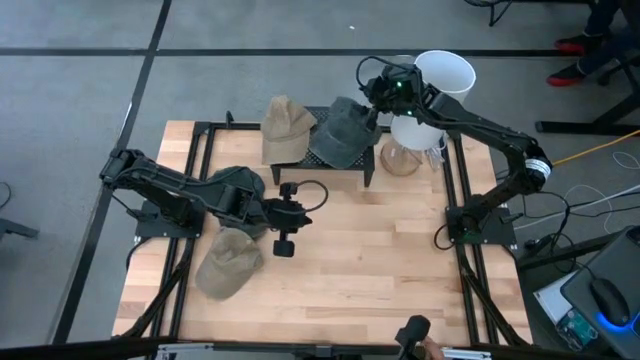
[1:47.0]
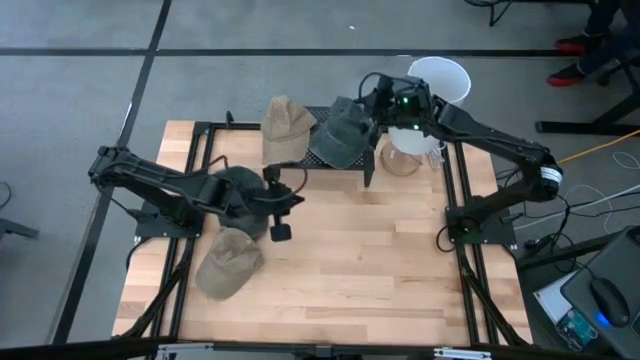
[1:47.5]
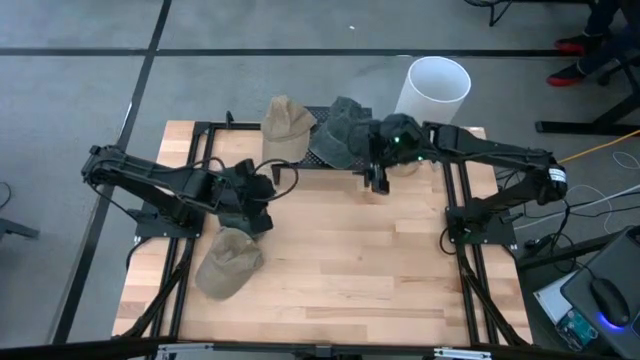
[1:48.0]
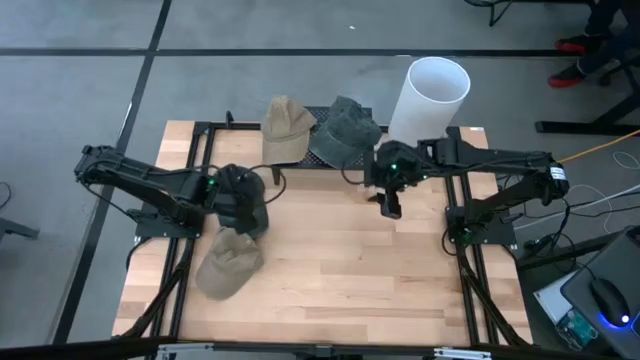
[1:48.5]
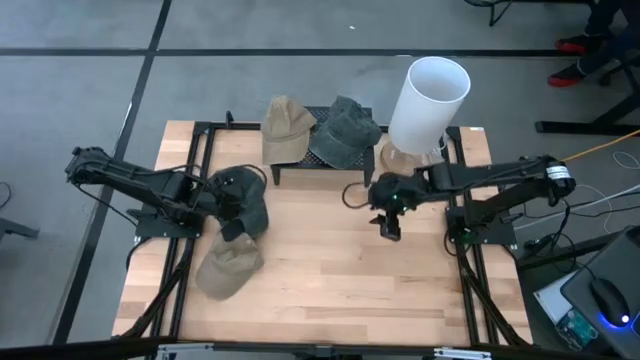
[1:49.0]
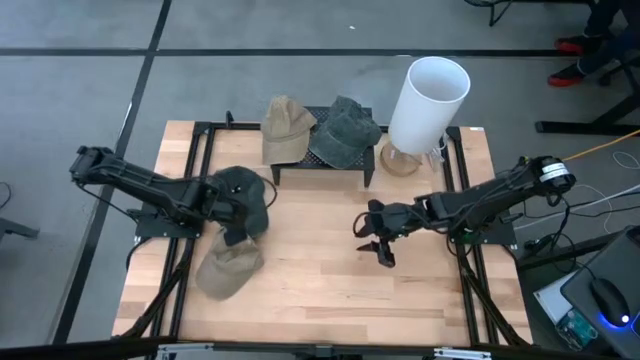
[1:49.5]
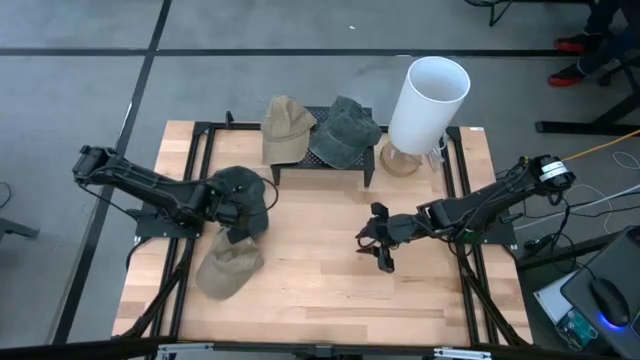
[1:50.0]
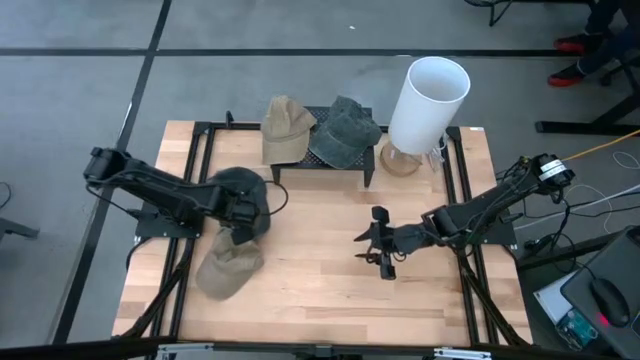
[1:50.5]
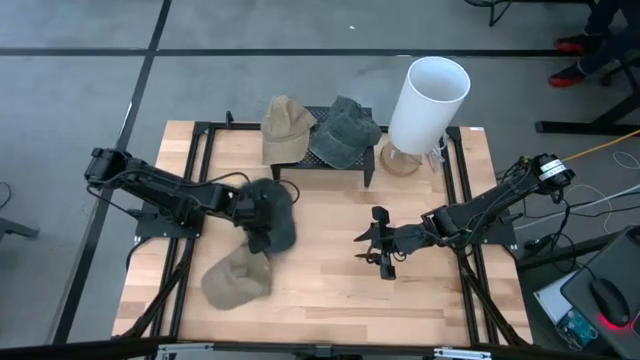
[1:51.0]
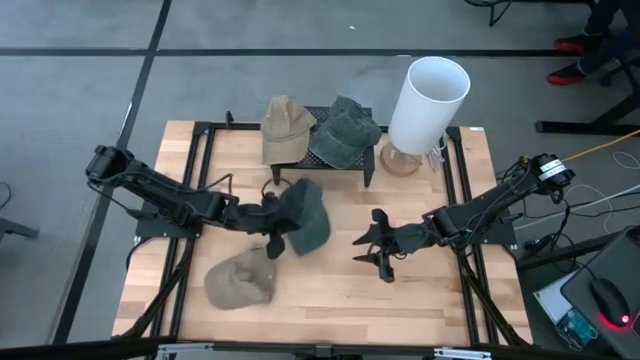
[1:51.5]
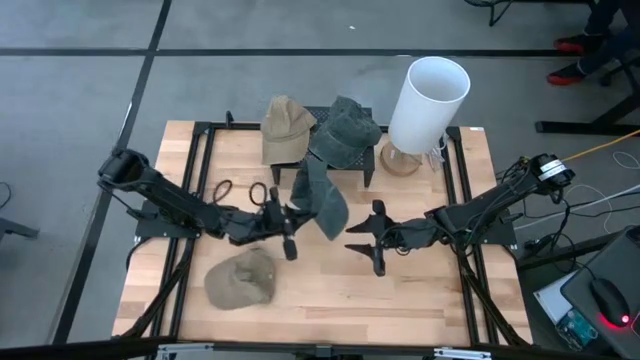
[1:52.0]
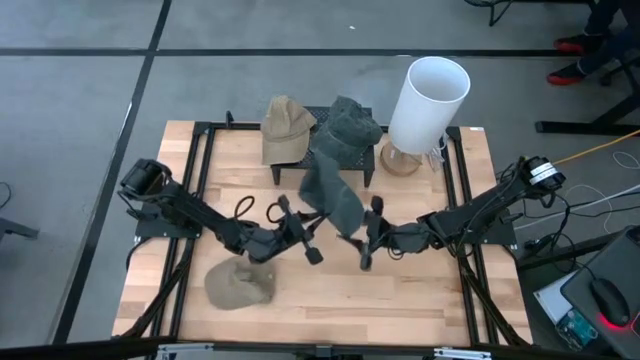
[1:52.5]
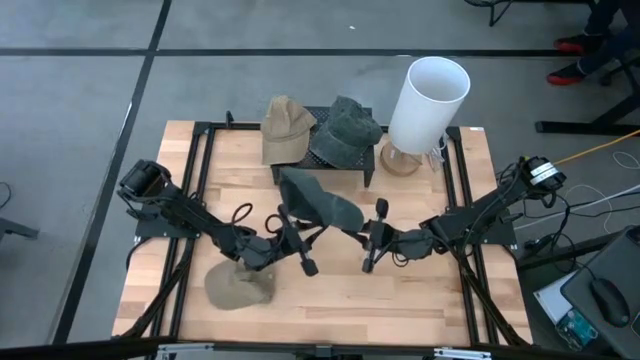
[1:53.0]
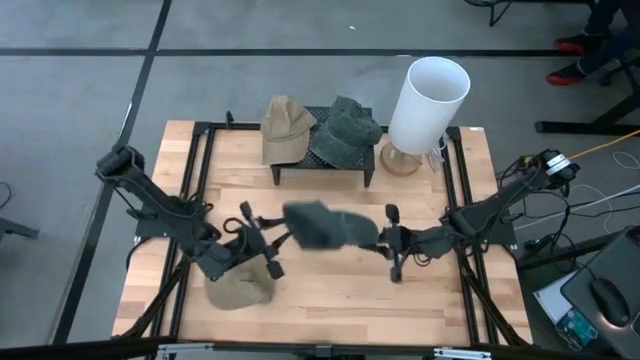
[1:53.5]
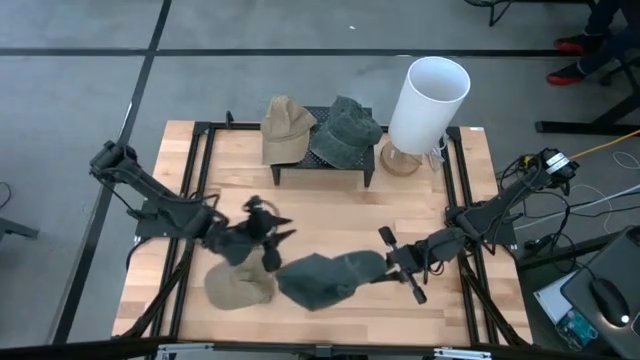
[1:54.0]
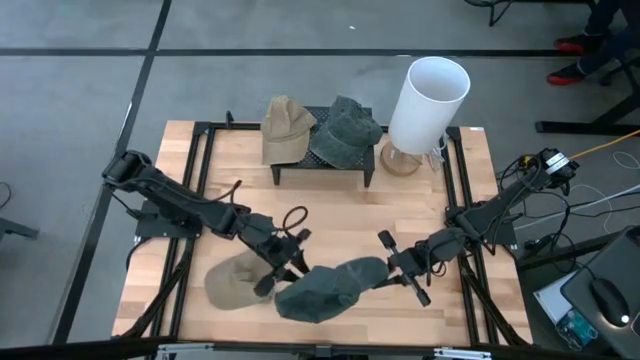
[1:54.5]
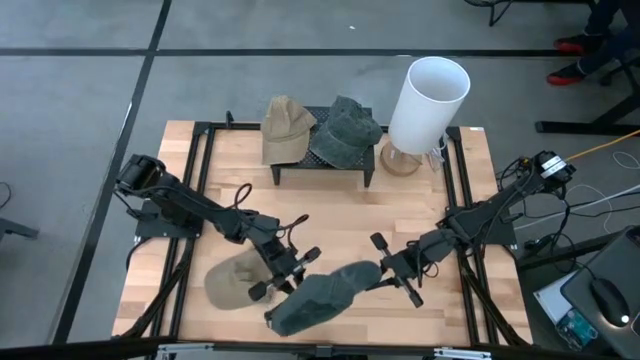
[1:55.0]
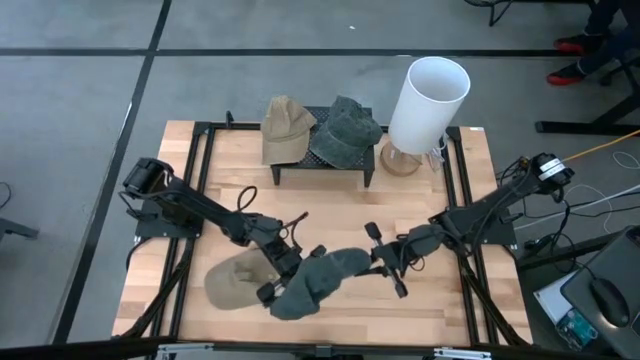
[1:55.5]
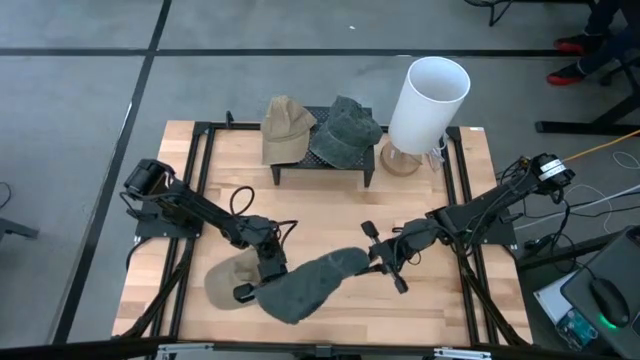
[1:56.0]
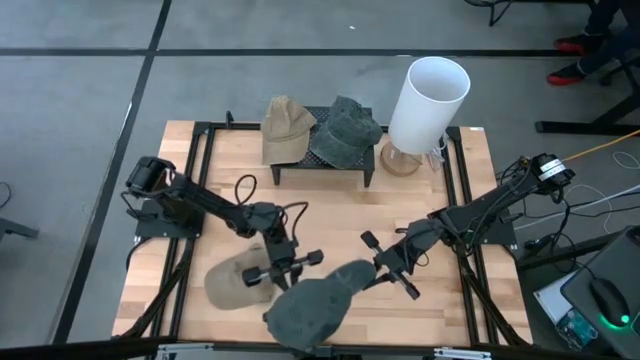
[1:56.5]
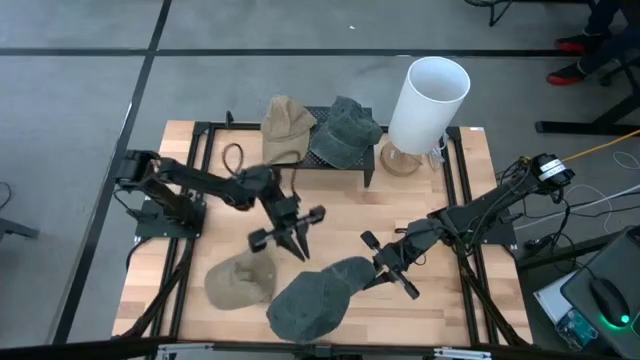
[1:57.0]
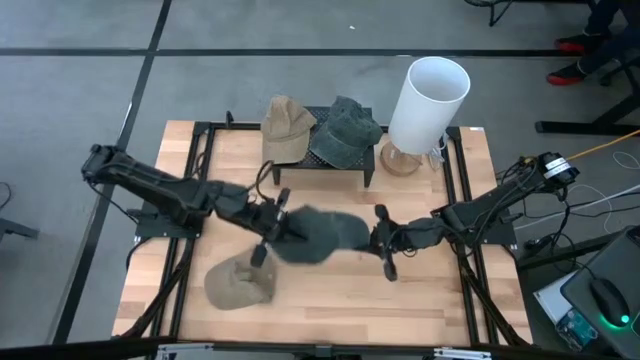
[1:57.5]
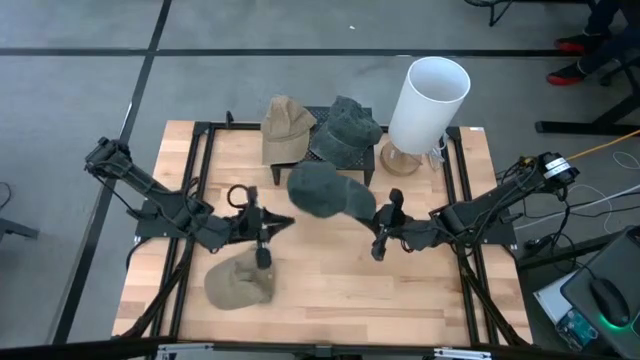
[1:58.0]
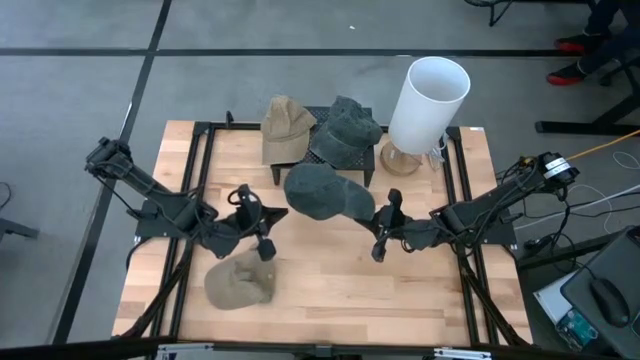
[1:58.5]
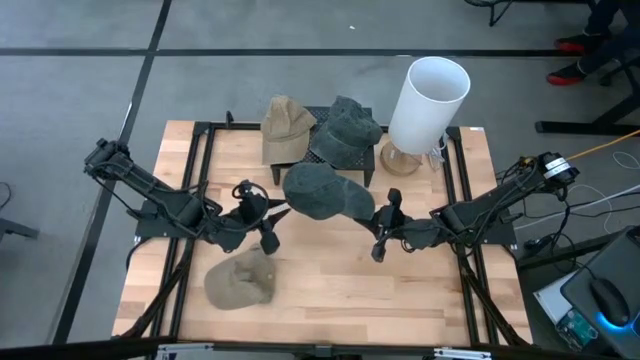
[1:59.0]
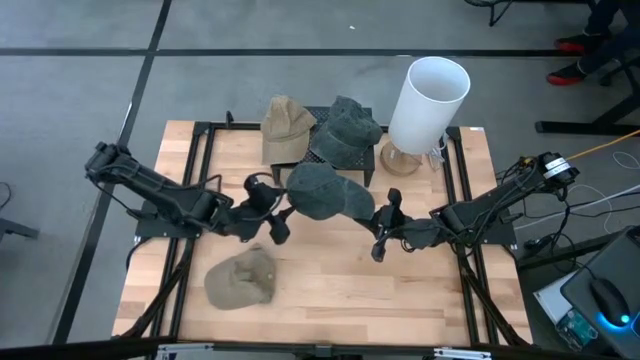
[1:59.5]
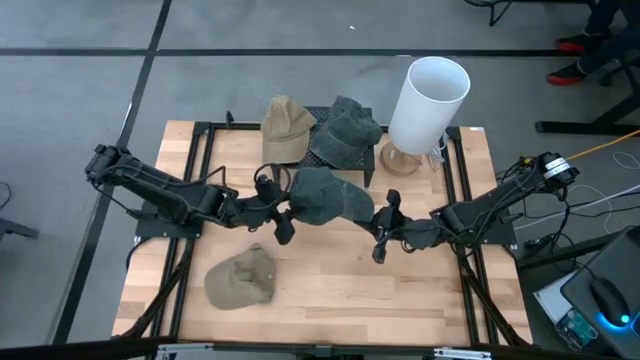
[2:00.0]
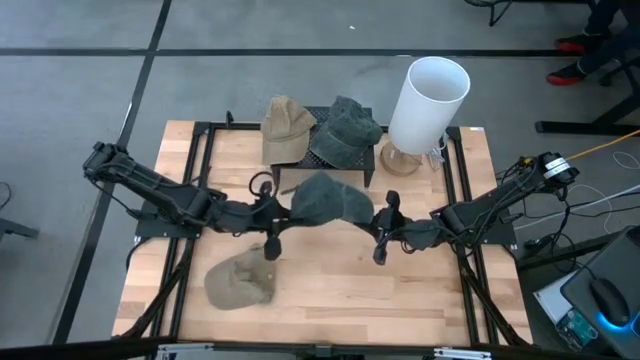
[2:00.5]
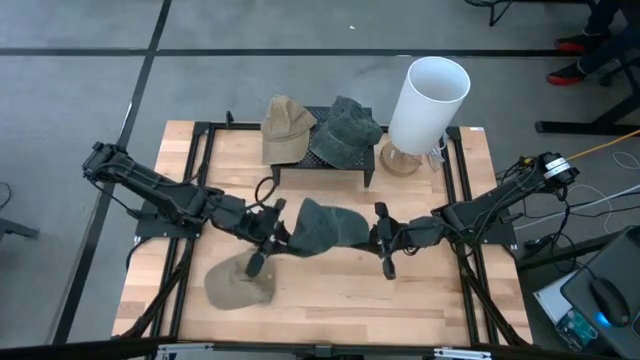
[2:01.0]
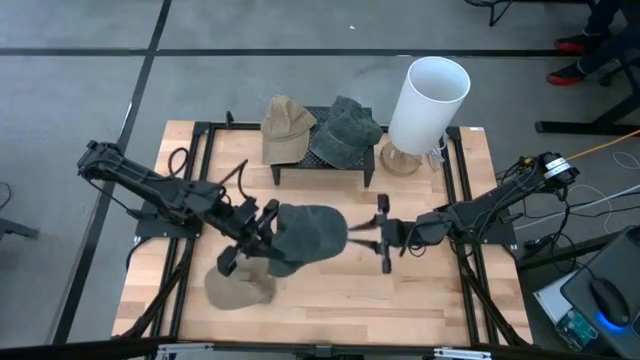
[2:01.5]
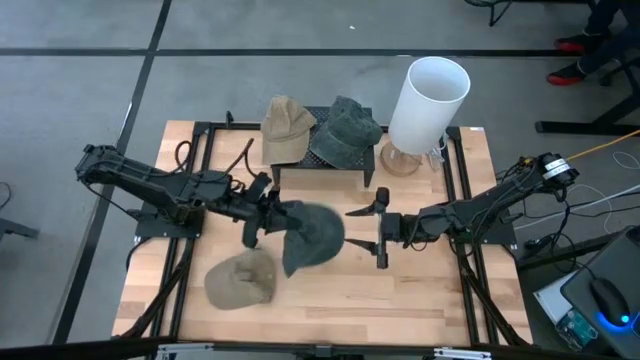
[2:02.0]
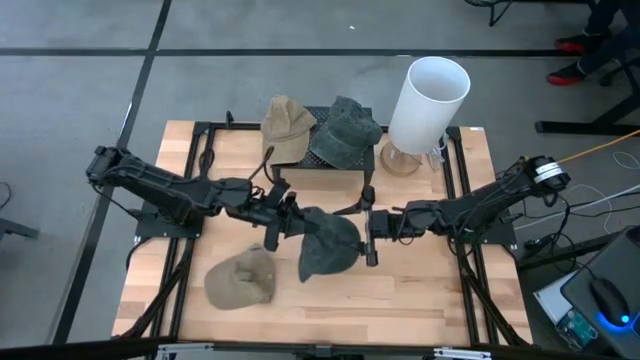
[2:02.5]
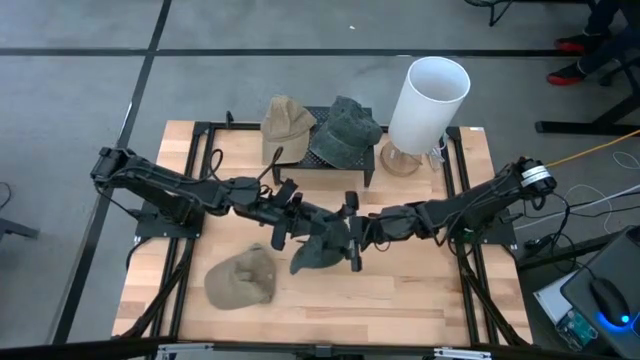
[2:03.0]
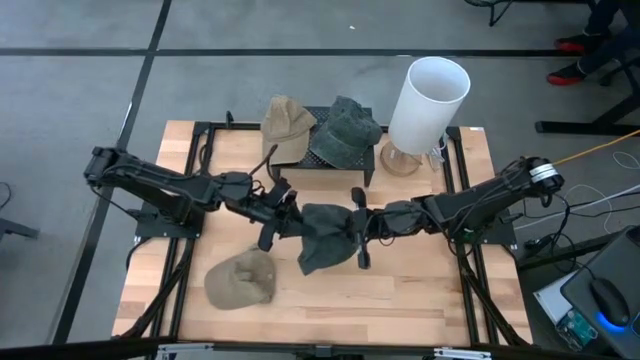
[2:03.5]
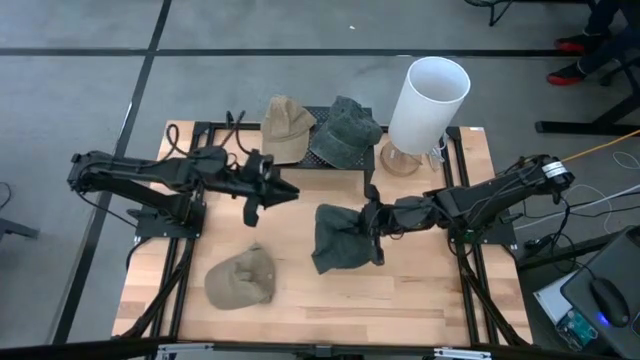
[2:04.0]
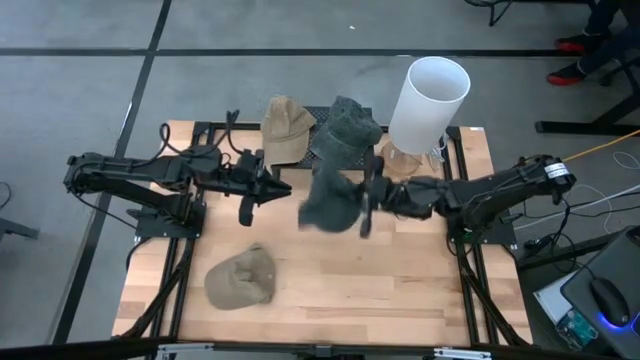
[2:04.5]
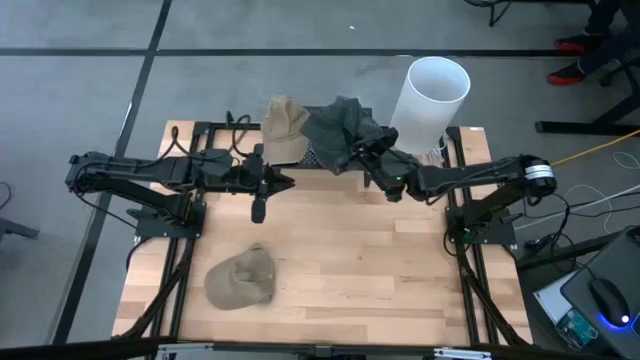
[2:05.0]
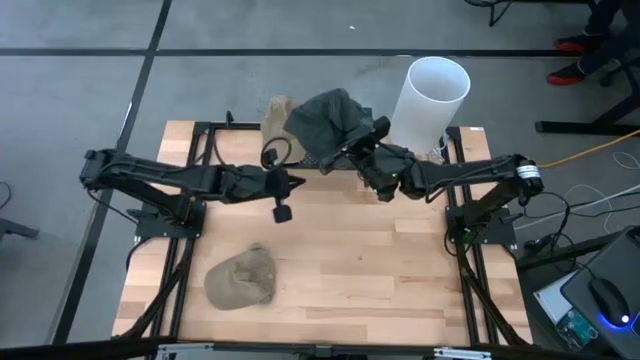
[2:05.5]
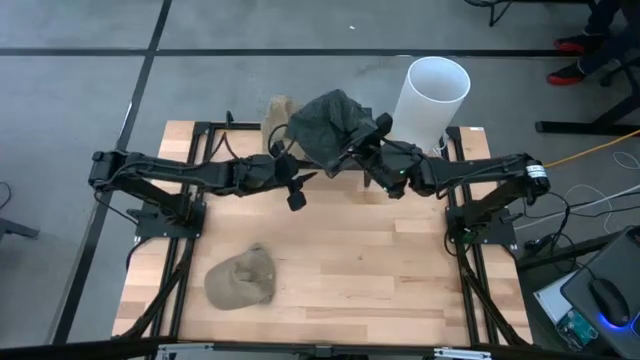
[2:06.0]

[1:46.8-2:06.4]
Task: Pick & Place hat
Stack the dark green cap on top of the other dark green cap on the shelf

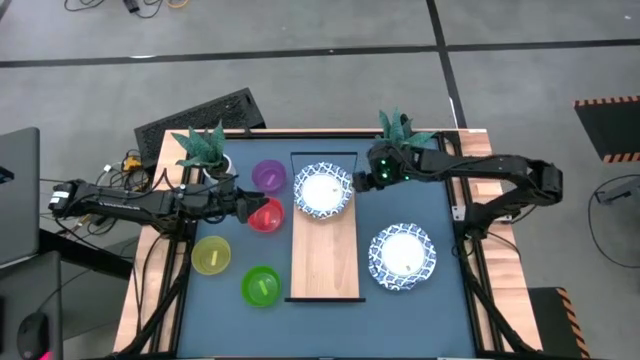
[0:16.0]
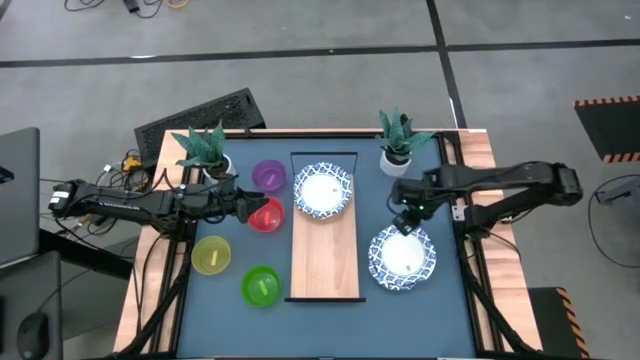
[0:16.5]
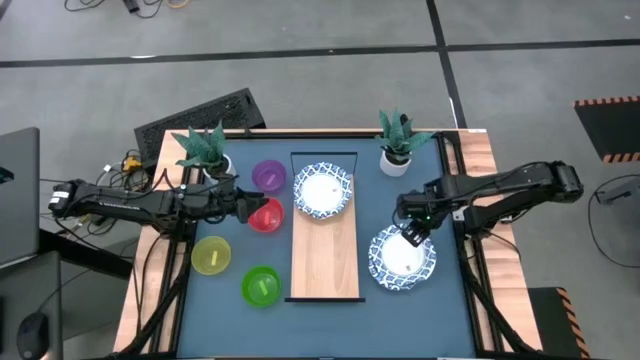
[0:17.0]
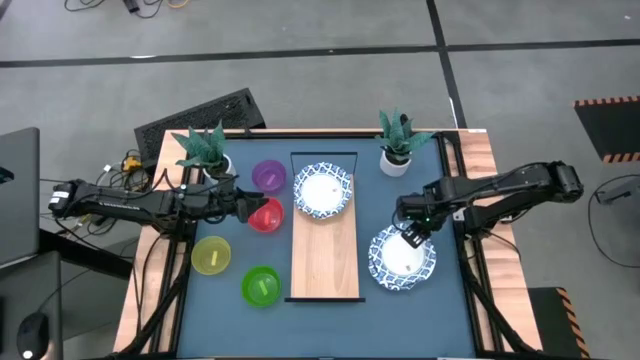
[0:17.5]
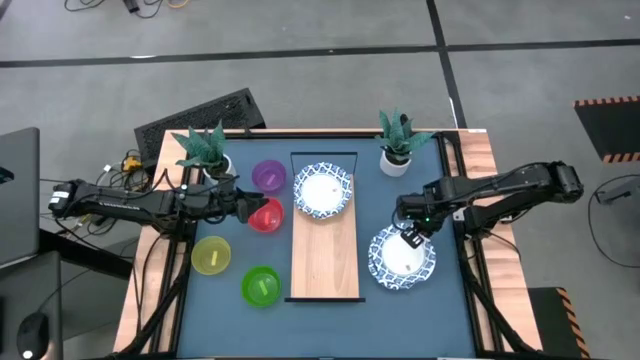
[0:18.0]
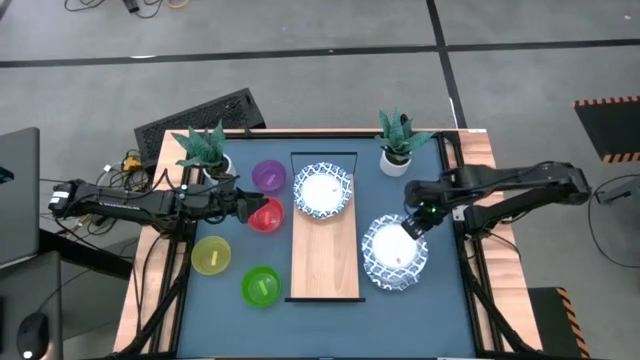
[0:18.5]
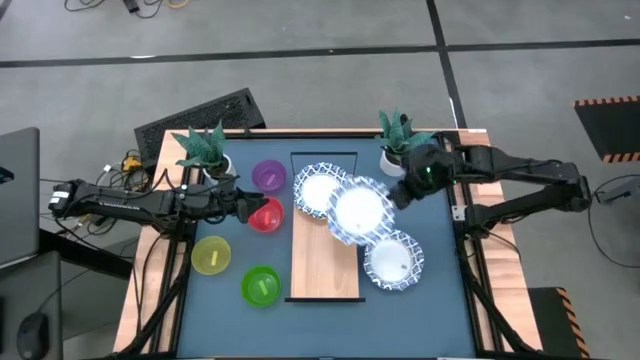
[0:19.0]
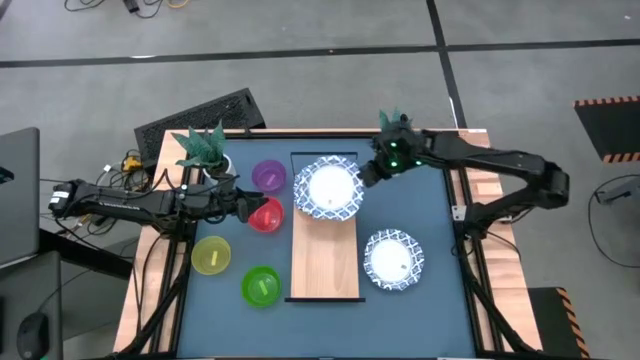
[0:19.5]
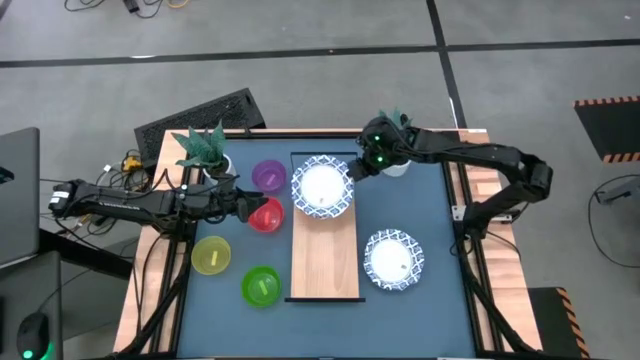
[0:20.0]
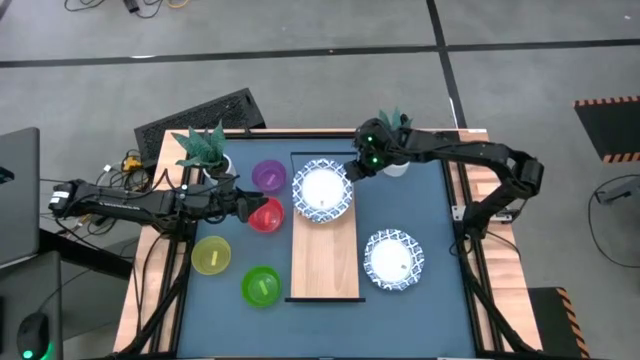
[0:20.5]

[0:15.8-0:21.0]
Task: Place and stack bowls onto a shelf
Stack the white patterned bowl on top of the white patterned bowl on the shelf
